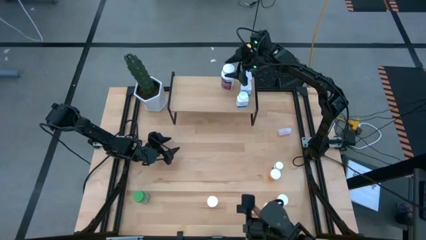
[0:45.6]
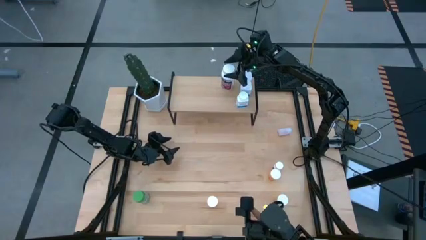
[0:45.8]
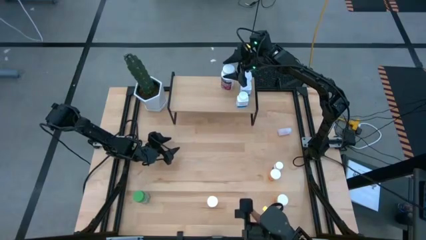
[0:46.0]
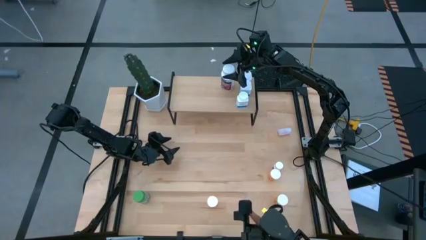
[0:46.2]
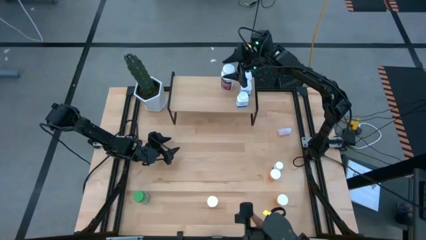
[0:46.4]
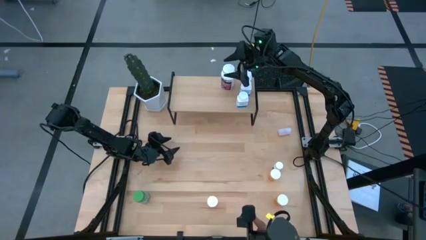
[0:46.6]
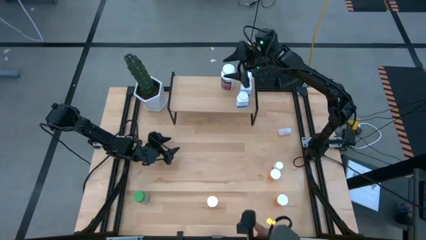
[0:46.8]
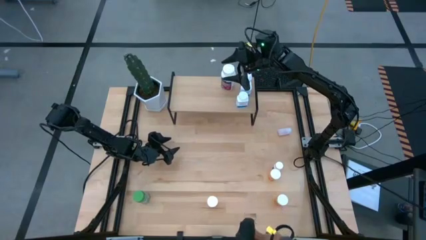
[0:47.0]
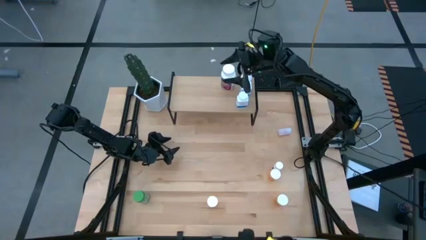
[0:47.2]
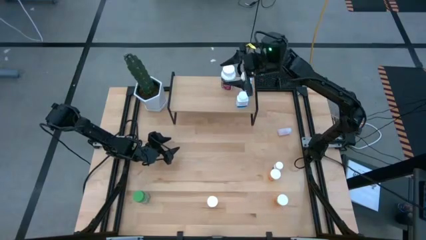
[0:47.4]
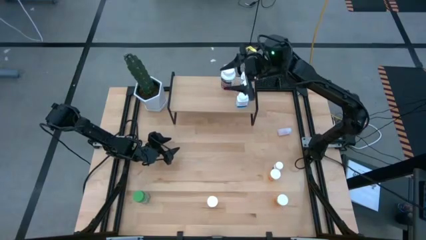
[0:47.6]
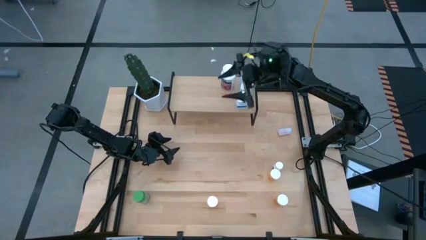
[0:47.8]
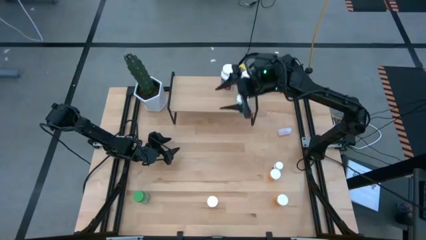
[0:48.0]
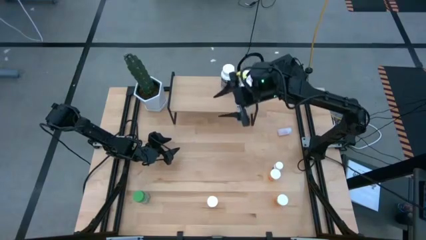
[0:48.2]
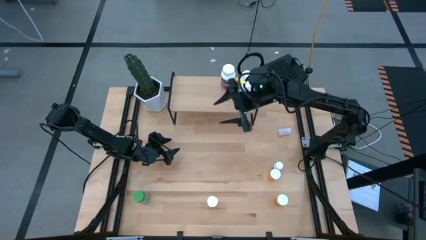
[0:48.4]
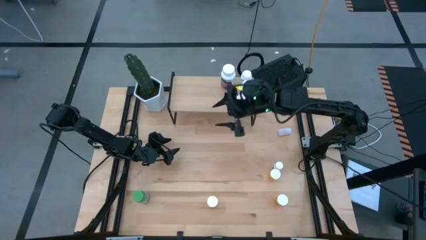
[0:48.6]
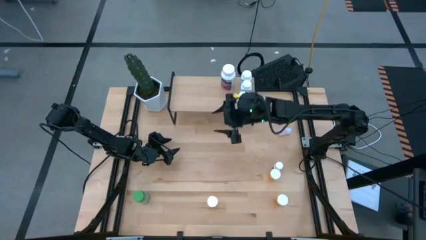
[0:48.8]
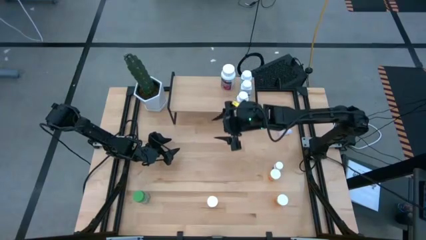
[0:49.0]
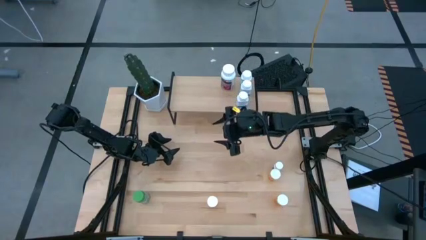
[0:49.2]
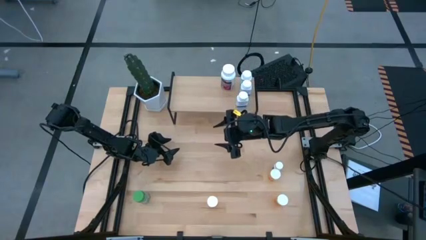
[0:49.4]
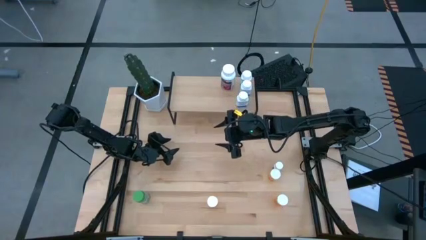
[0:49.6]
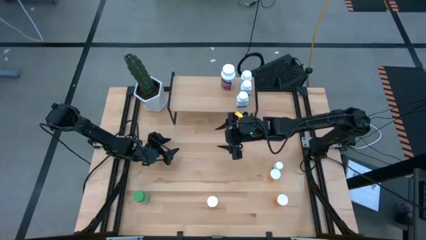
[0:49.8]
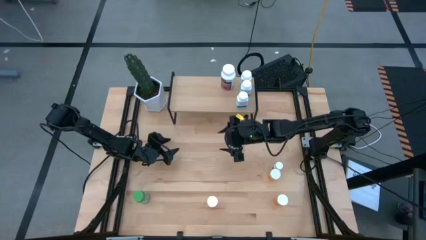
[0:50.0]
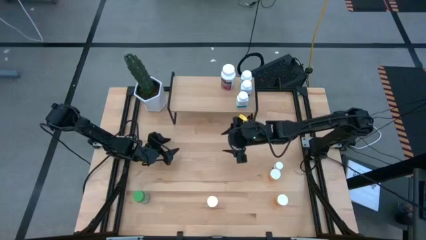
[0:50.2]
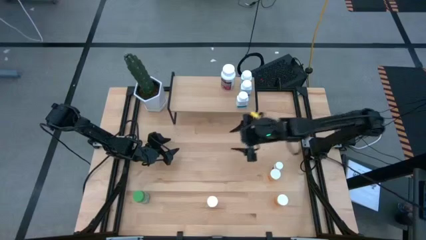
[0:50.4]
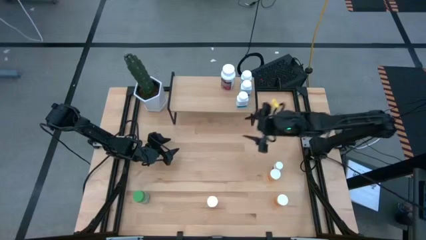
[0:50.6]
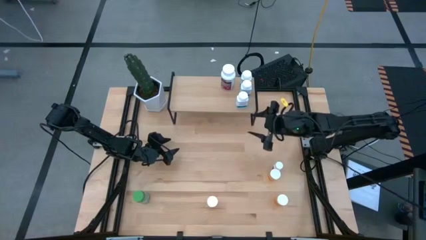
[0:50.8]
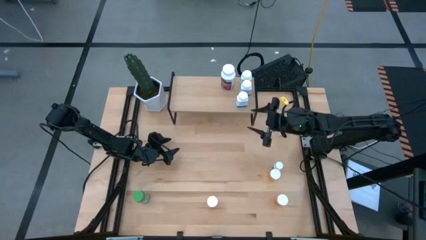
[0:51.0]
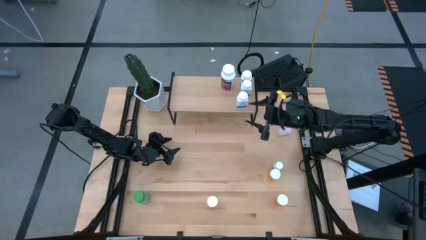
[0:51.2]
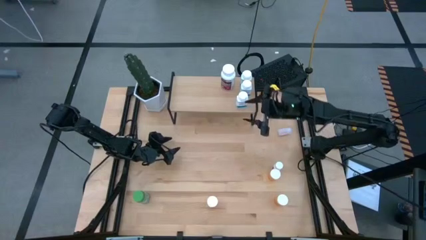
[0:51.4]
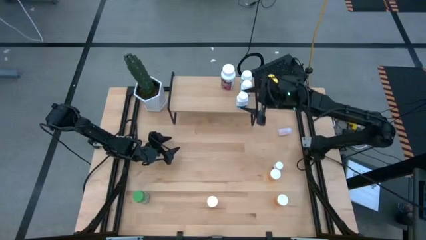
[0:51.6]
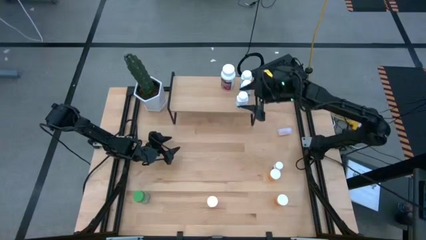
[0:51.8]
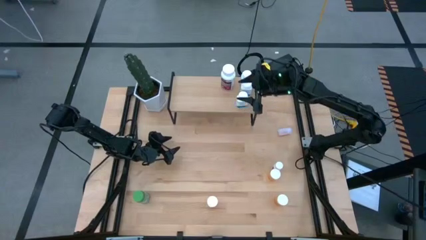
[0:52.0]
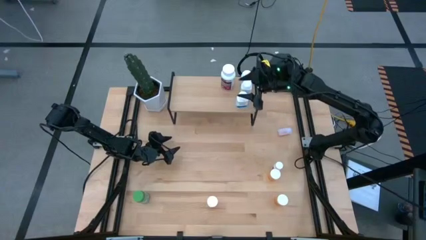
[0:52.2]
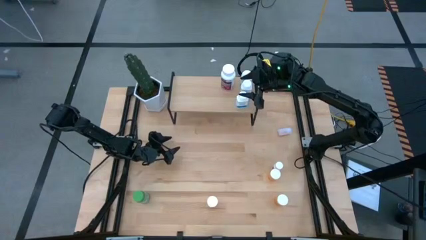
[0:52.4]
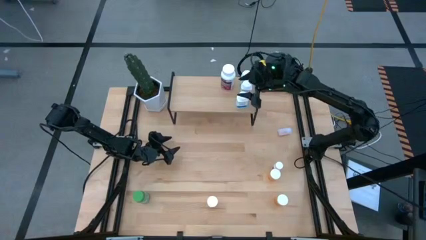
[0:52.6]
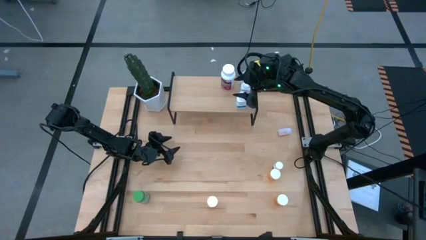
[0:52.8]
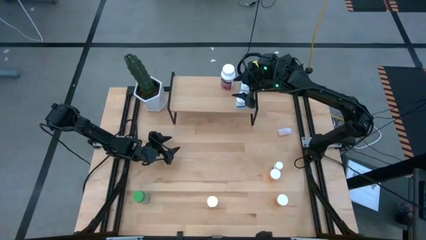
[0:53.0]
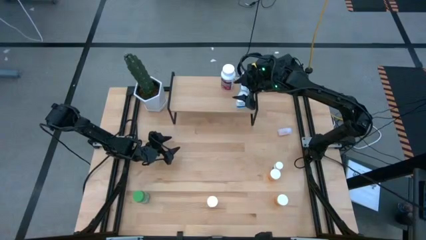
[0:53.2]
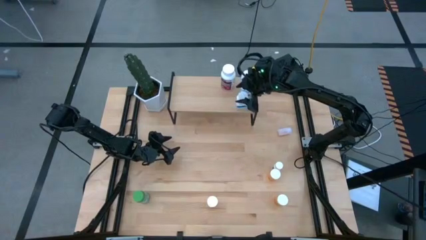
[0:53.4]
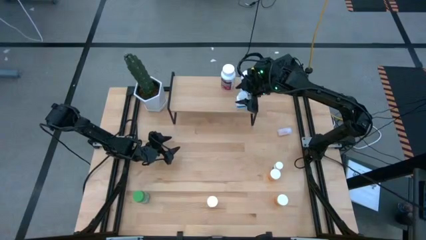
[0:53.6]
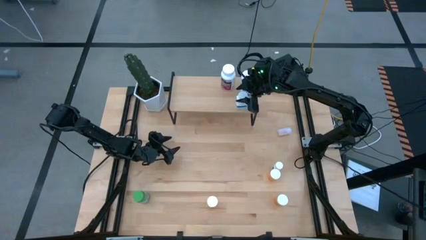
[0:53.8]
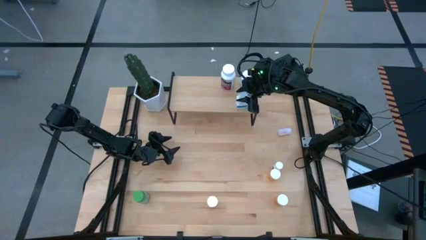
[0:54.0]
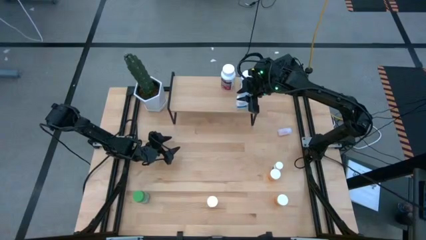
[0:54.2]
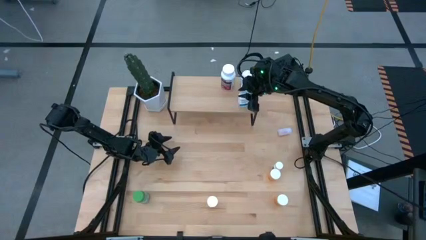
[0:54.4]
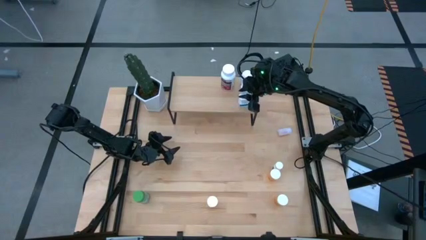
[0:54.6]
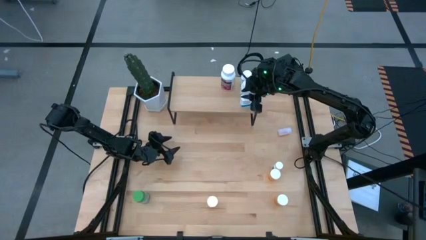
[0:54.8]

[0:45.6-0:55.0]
Task: Pick and place medicine bottles onto shelf by color
Adjust the white and blue pill bottle on the shelf

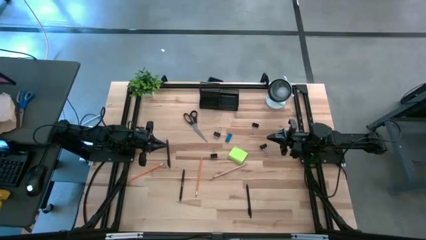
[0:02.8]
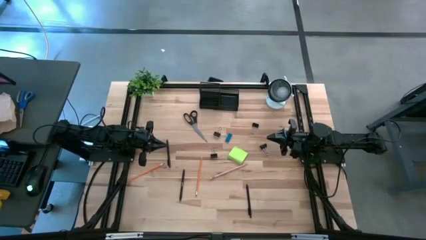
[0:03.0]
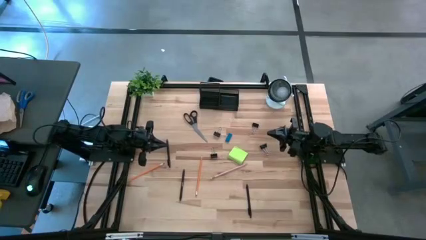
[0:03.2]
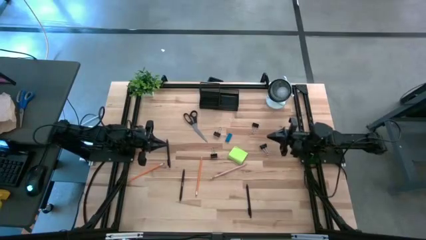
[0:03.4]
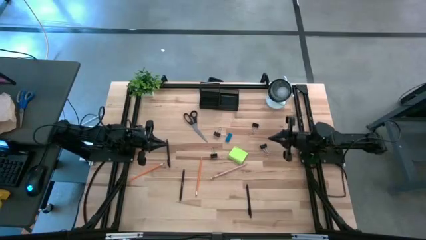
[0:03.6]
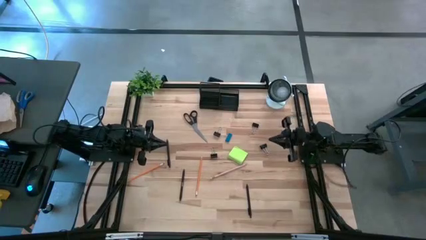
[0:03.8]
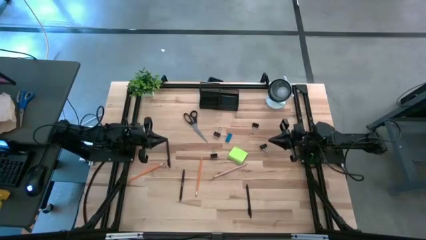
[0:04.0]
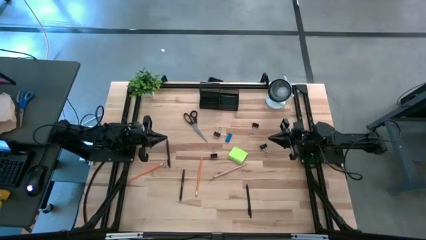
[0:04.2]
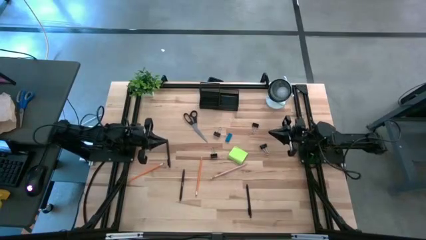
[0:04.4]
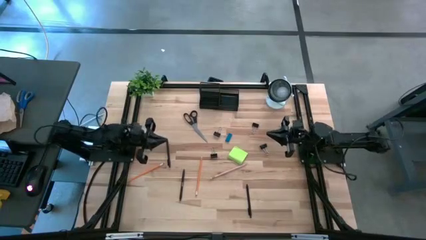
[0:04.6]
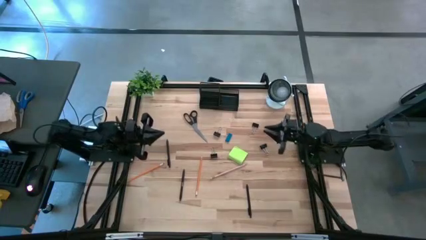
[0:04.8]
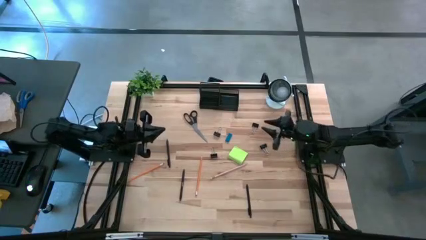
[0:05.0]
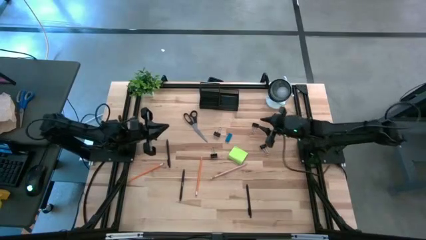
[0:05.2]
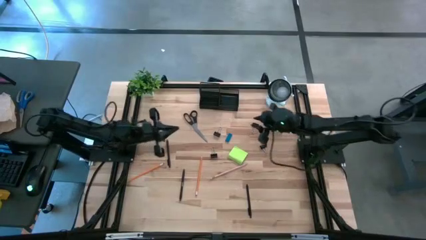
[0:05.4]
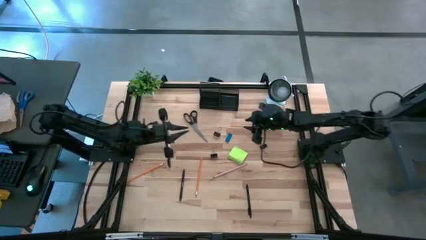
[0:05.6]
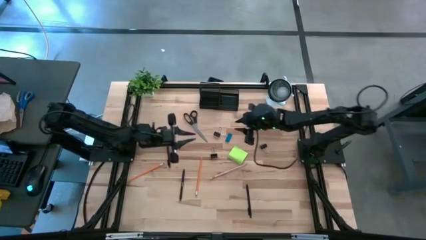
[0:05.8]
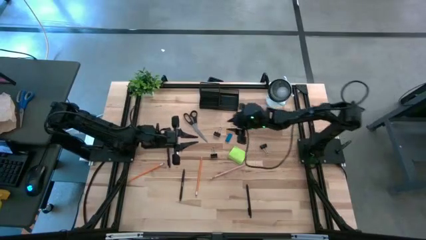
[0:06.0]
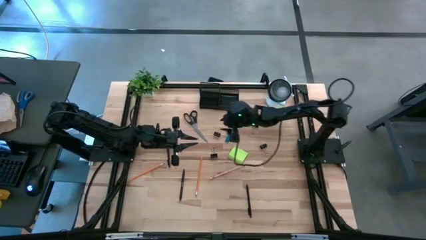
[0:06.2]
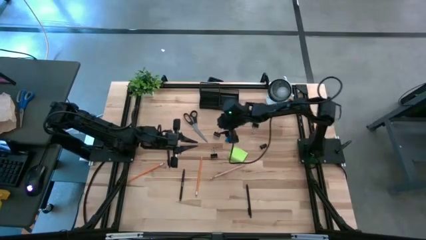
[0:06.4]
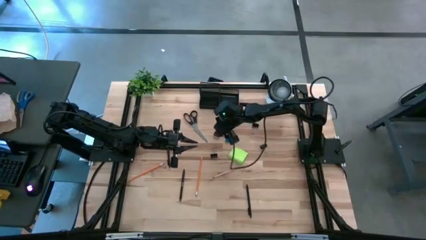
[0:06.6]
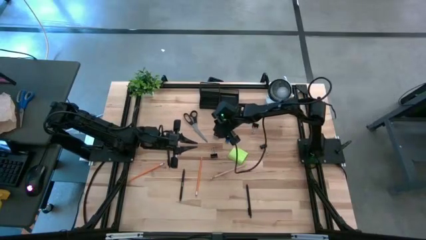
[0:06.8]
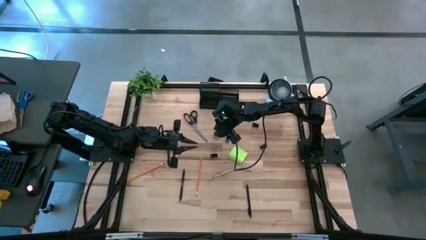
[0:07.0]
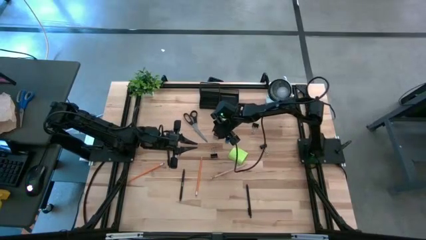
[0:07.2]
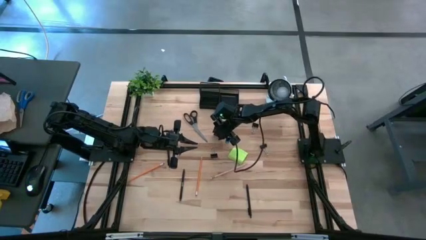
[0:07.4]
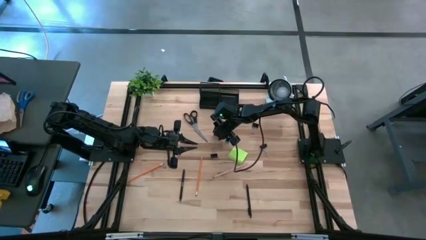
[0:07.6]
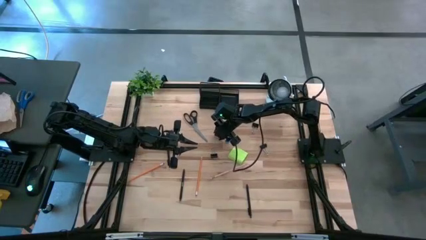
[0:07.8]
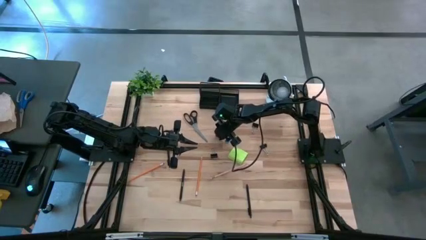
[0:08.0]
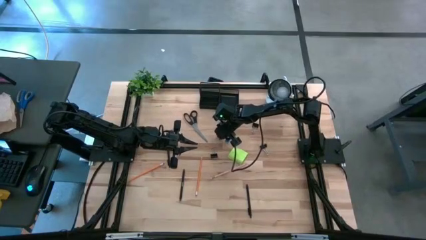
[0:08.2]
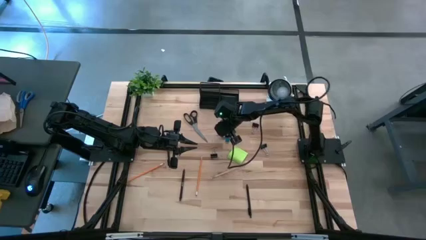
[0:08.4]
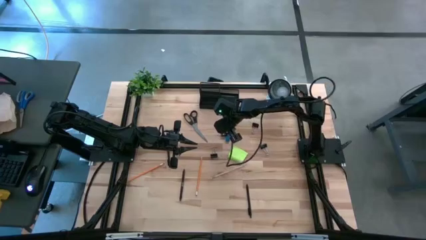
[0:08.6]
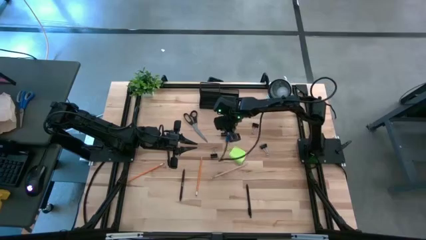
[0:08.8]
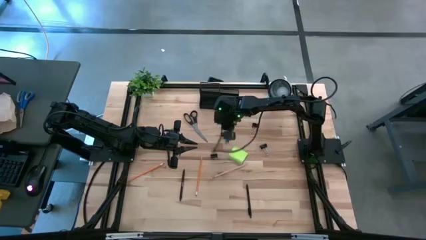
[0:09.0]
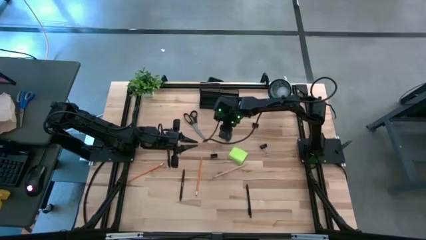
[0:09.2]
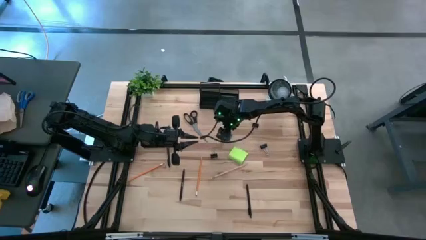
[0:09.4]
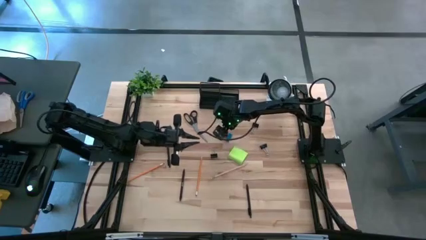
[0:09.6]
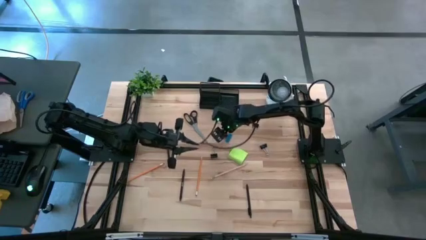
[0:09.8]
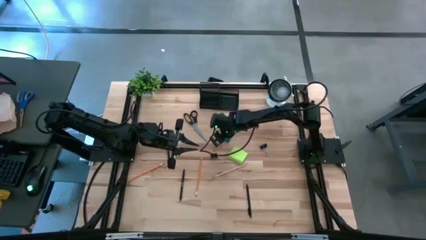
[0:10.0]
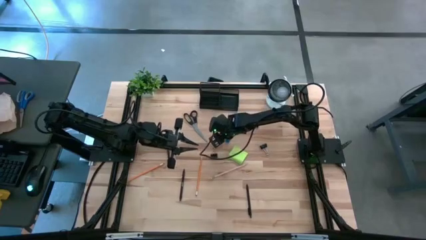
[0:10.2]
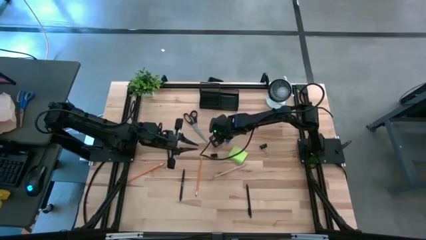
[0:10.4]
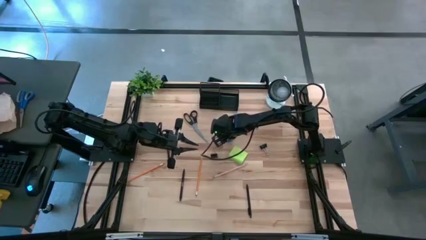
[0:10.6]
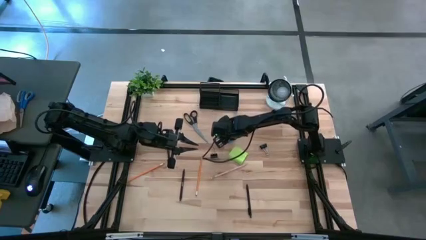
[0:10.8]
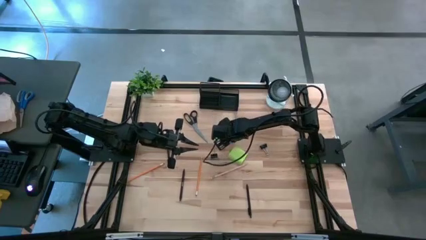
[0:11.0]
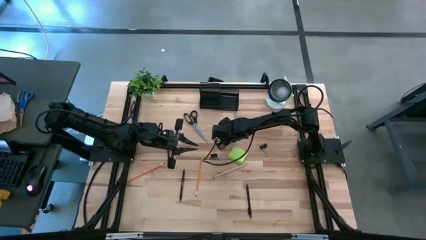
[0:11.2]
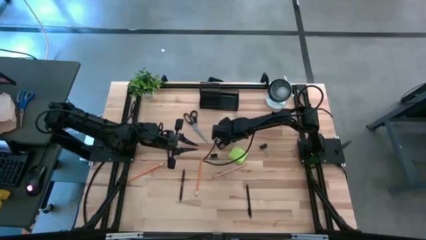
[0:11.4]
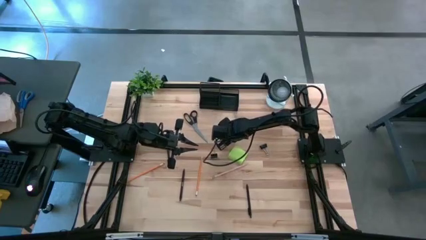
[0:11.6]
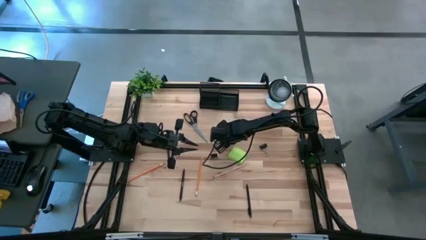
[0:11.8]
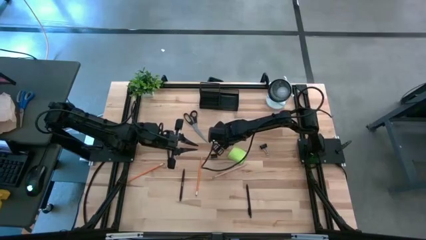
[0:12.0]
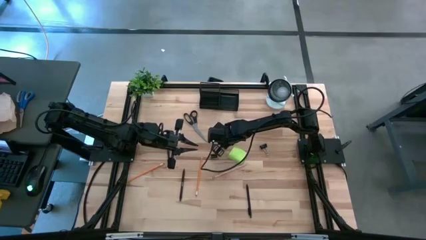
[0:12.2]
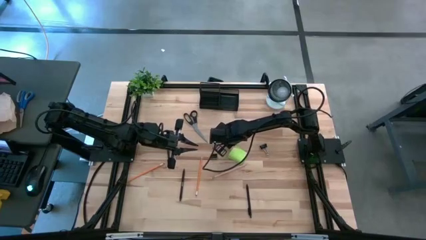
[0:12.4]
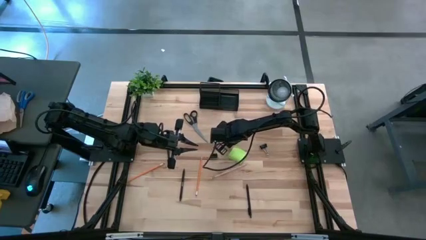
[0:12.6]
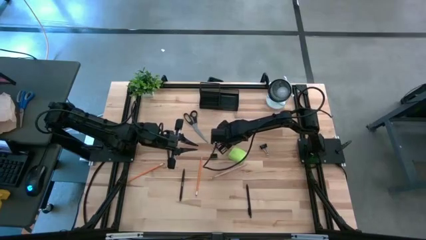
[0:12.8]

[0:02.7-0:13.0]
Task: Pick and place office supplies into organizer
Put the black binder clip into the black desk organizer
